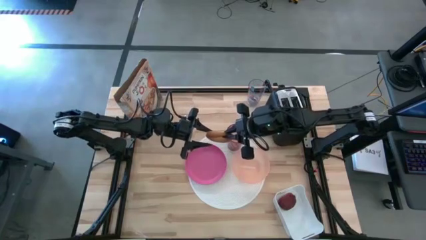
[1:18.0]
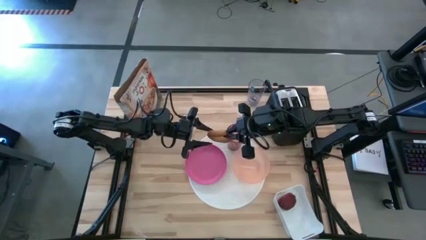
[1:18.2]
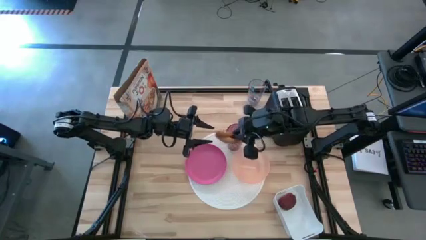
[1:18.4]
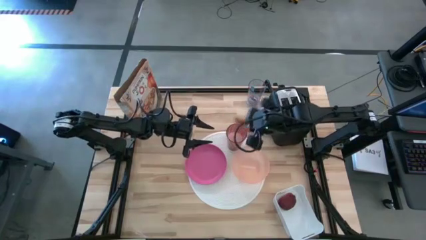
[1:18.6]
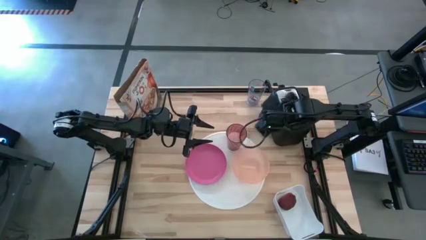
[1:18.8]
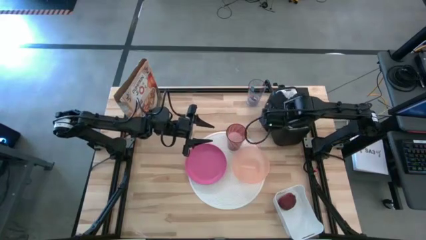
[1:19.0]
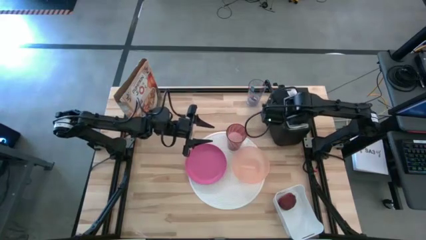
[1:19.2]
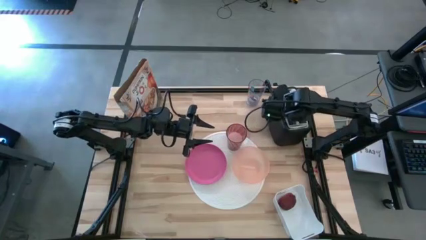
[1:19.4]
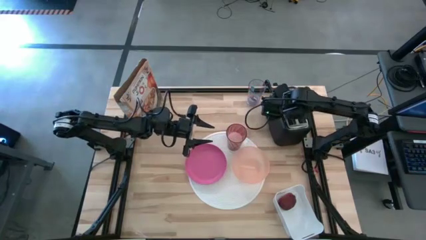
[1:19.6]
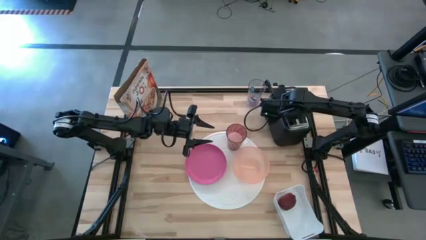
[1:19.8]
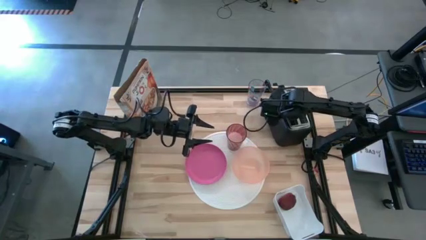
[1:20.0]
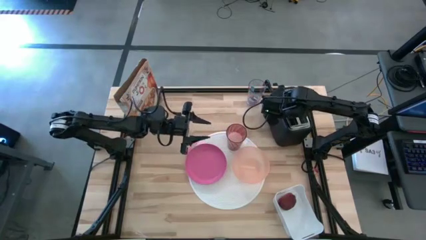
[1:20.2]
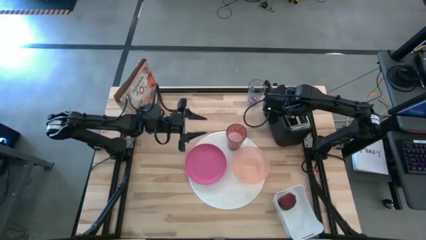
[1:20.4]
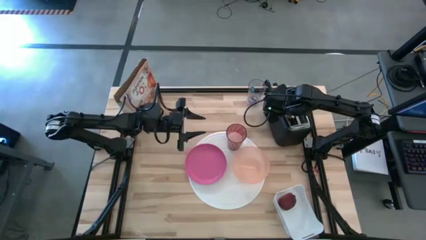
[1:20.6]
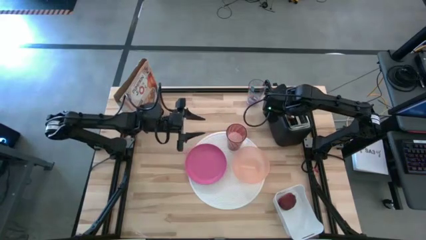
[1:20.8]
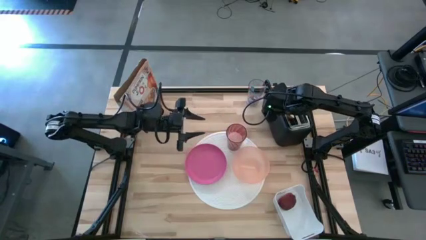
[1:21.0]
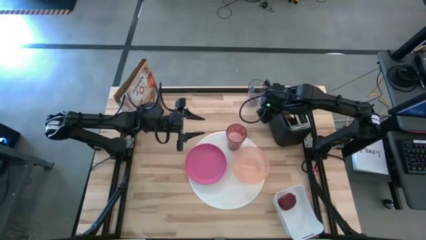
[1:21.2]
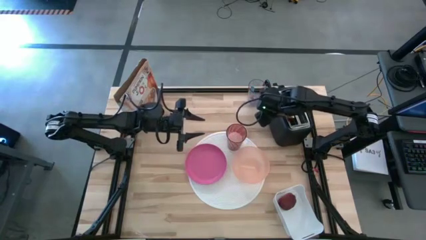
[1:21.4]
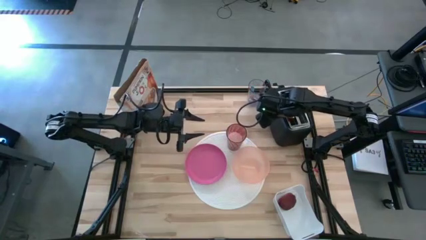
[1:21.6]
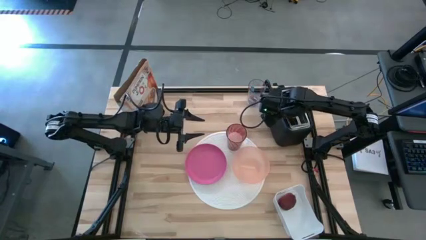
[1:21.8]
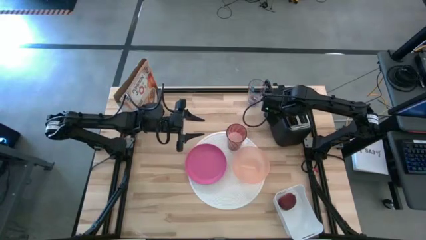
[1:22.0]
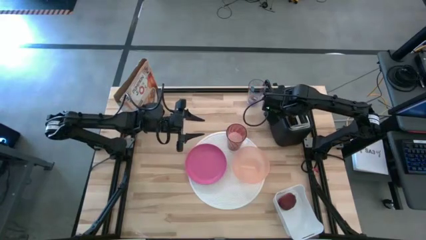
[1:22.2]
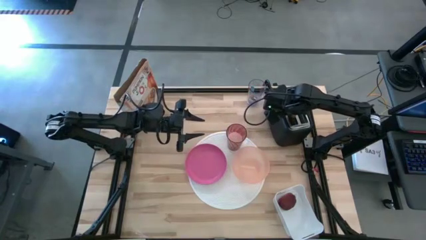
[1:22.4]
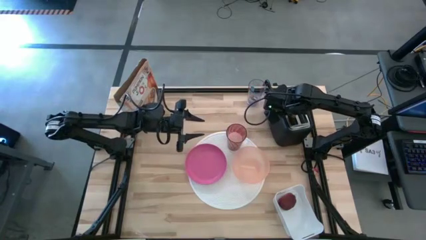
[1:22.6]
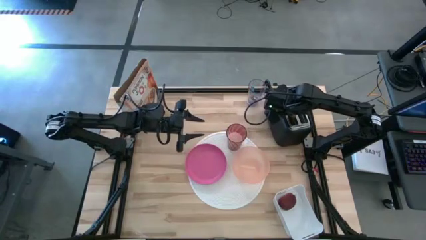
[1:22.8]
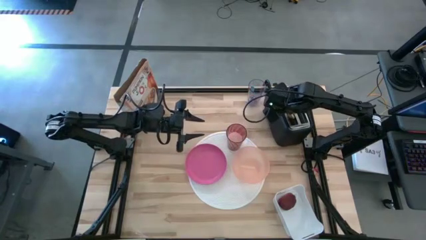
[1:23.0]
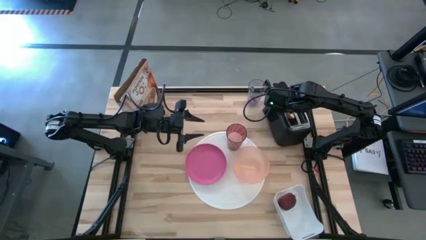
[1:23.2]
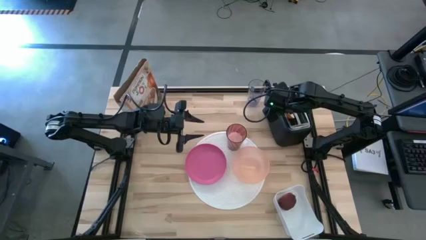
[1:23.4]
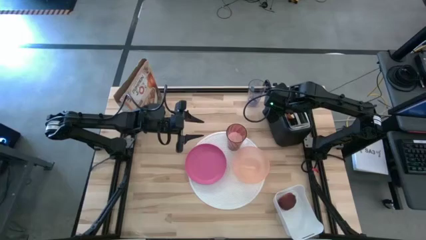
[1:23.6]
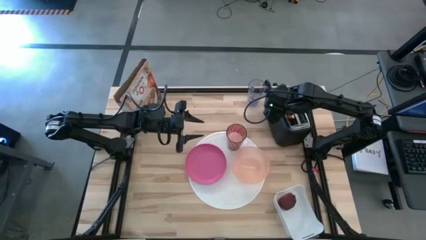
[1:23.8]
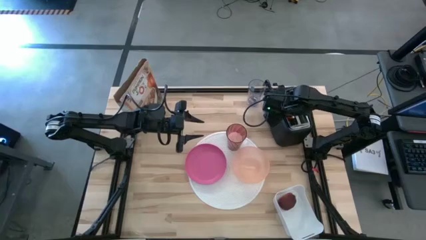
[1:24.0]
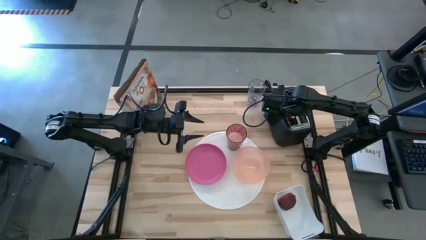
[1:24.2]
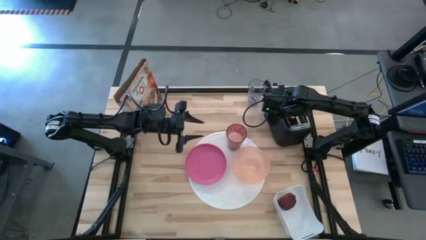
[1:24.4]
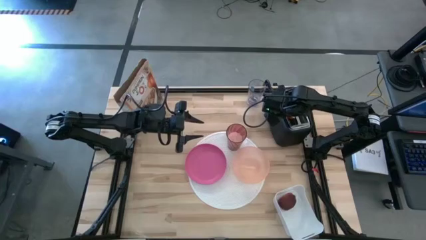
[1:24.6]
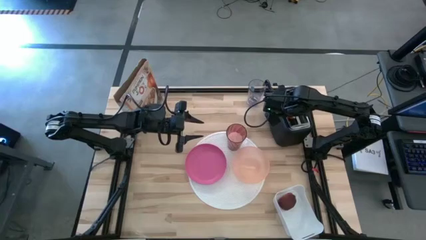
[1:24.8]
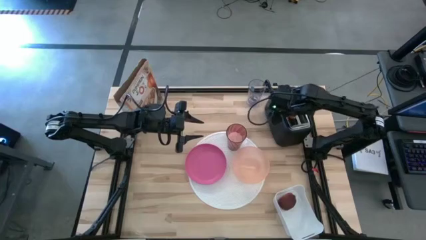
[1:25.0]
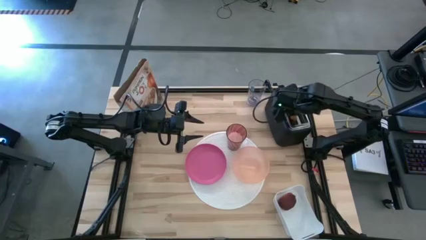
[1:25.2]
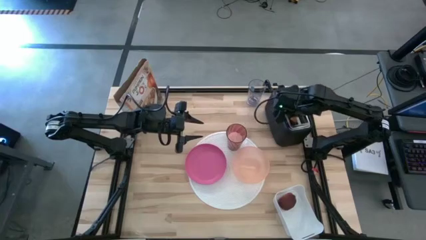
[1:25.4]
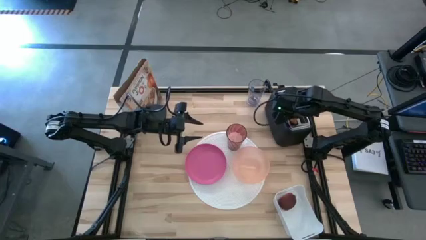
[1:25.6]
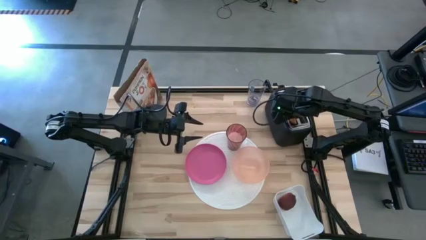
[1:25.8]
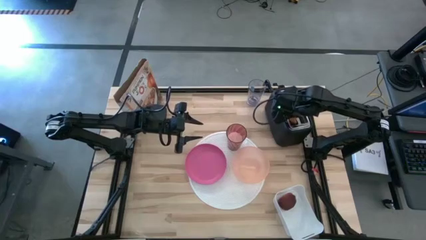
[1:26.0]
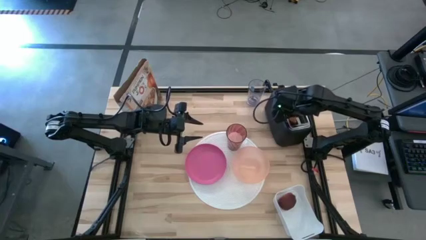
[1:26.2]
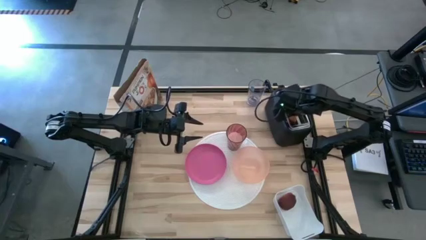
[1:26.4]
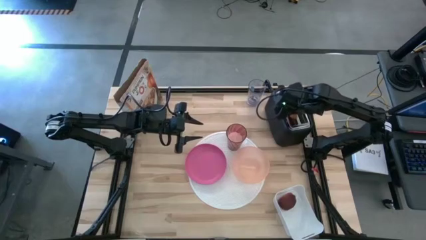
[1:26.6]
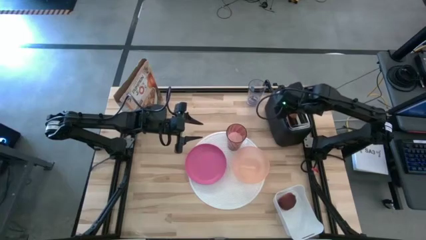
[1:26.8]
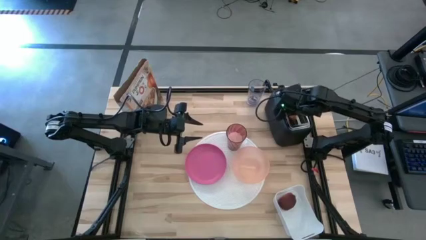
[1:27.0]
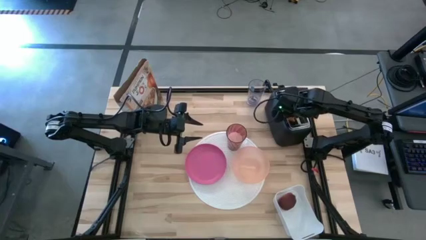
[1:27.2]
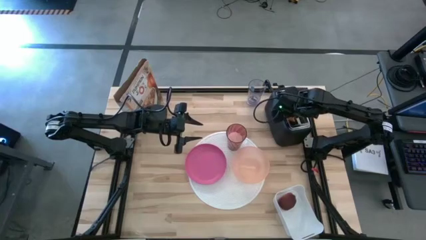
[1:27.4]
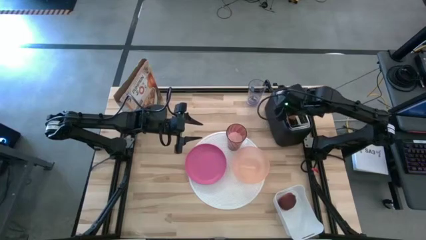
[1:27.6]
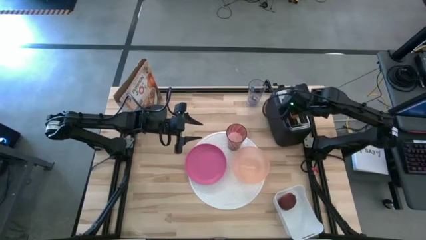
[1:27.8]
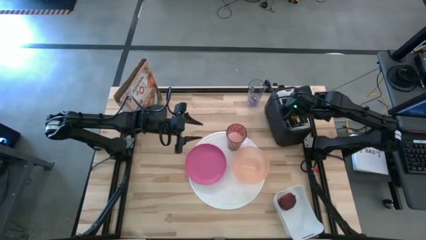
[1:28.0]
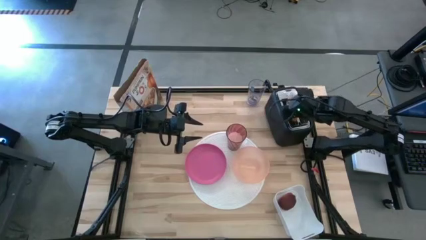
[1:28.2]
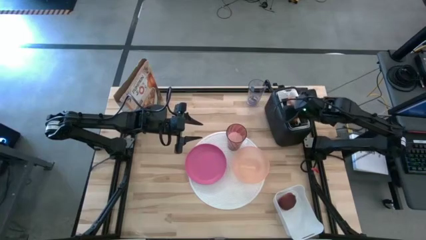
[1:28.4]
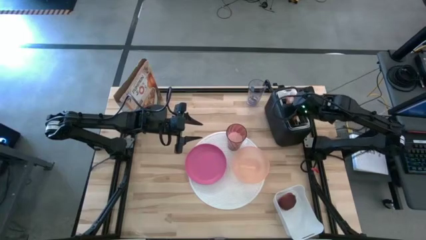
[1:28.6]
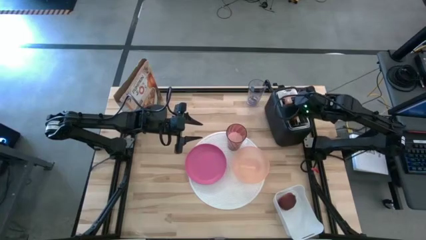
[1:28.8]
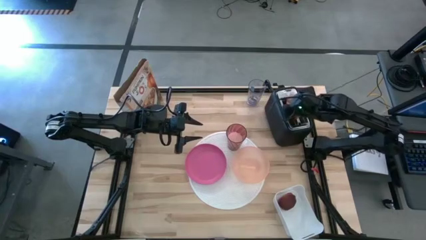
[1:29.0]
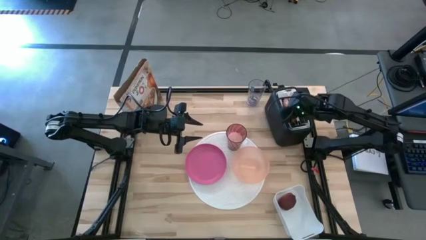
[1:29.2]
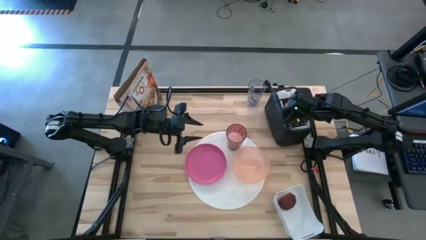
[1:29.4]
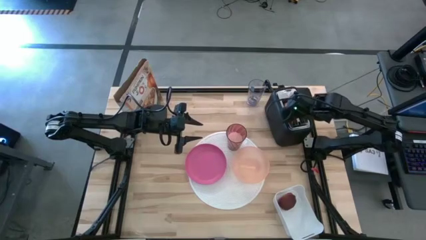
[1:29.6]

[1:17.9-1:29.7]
Task: Arrange a breakfast setting
Put the toasted bread on the pink plate
